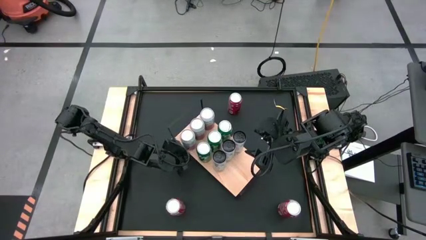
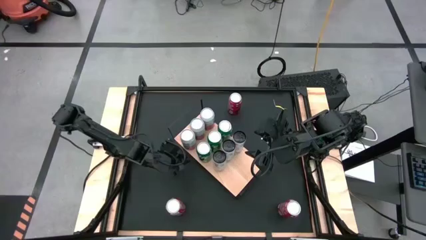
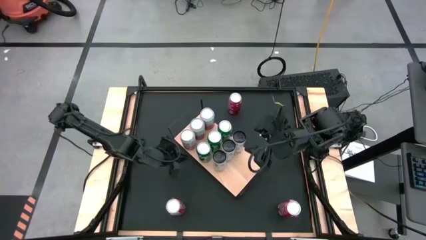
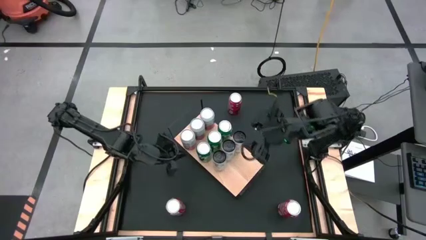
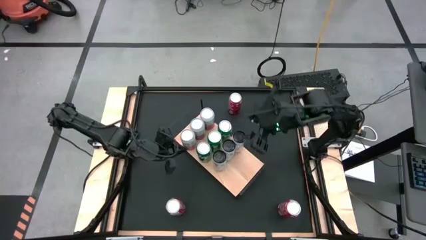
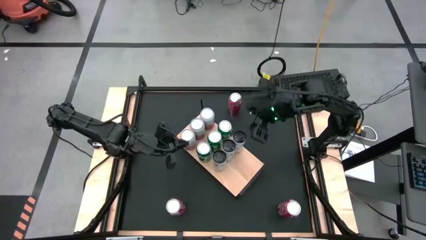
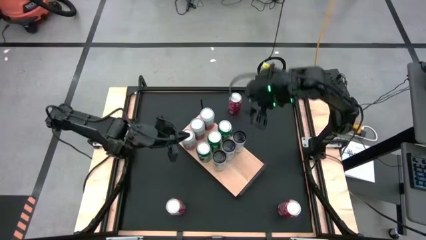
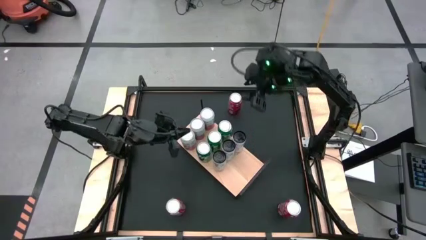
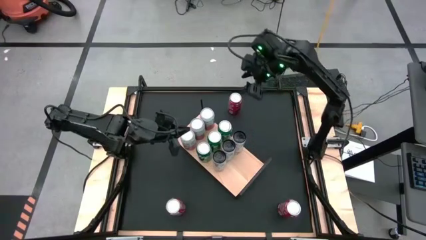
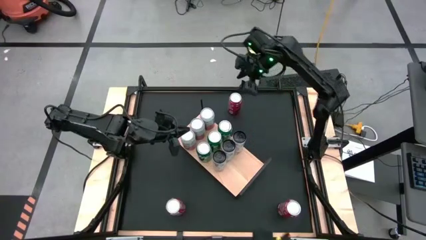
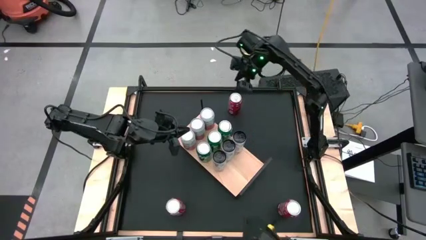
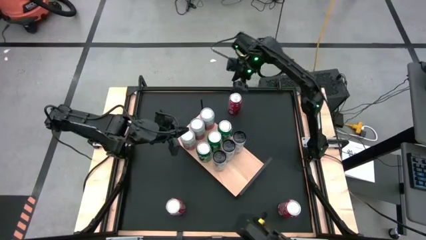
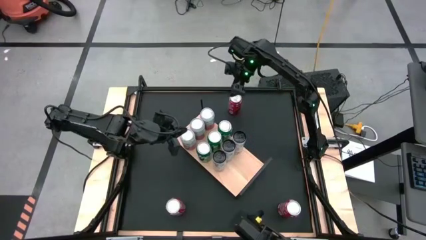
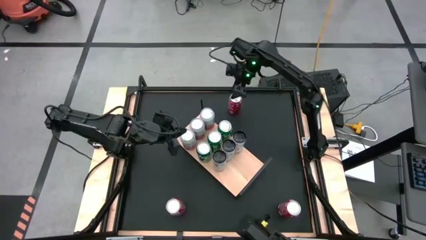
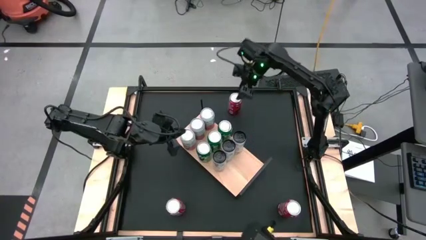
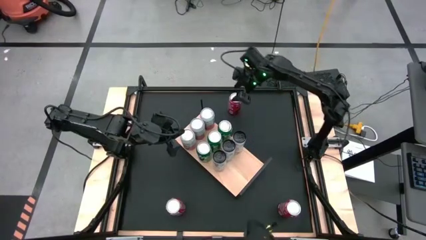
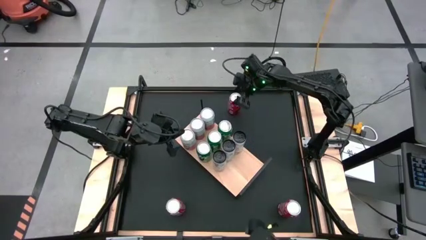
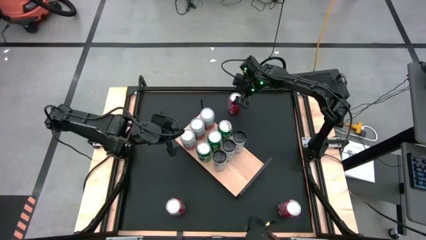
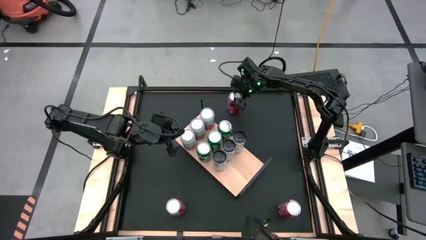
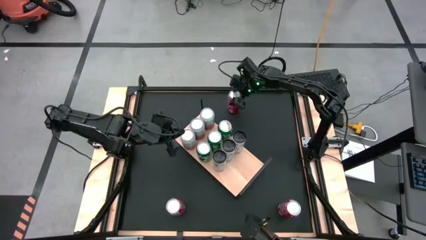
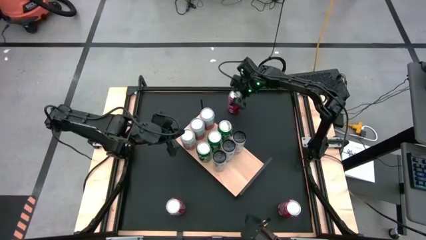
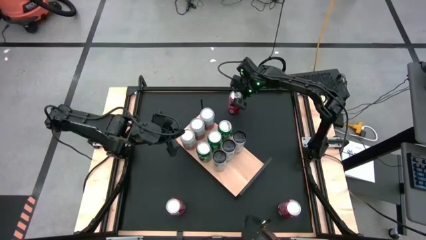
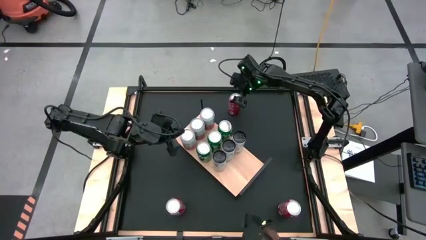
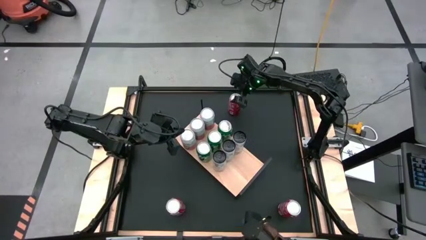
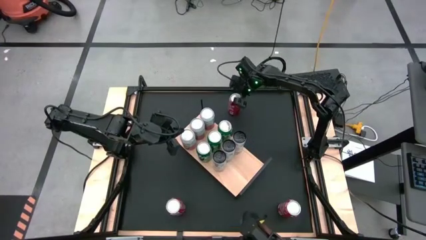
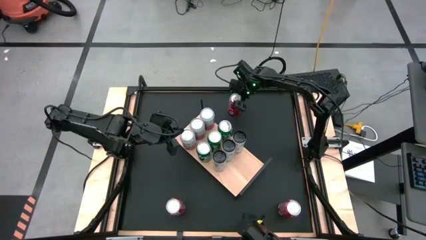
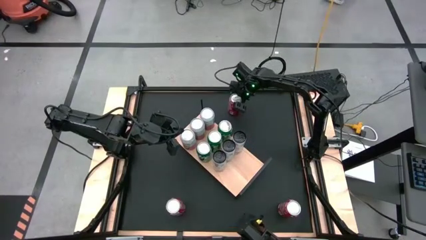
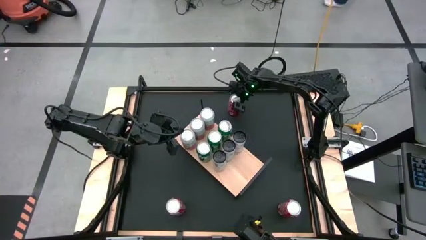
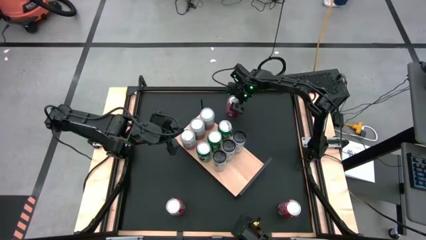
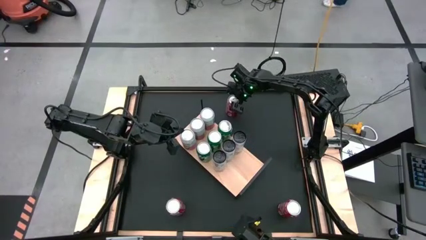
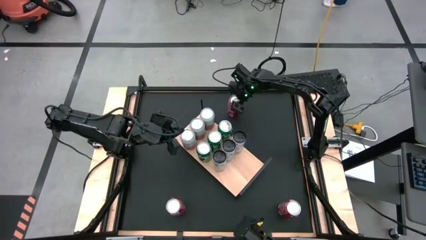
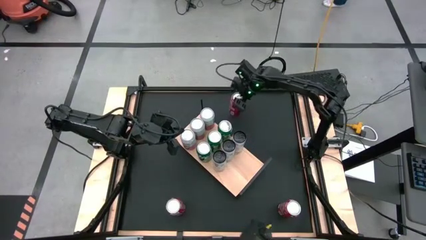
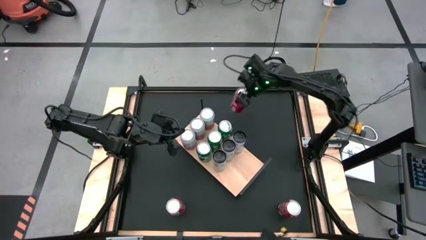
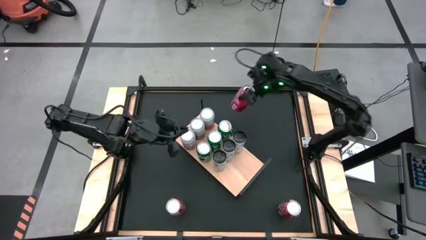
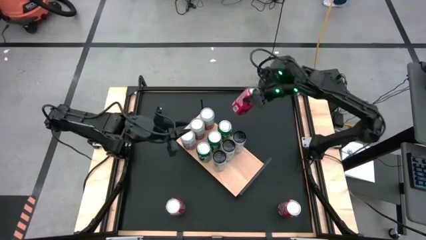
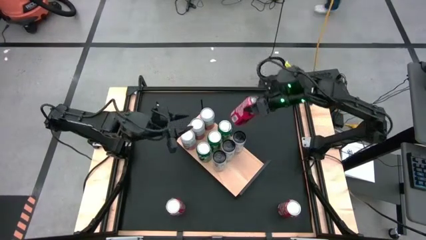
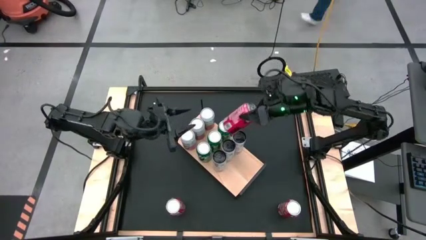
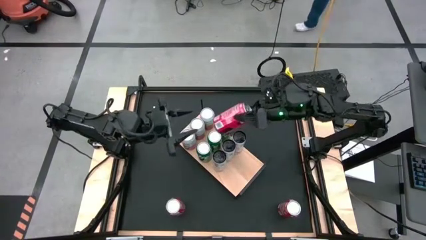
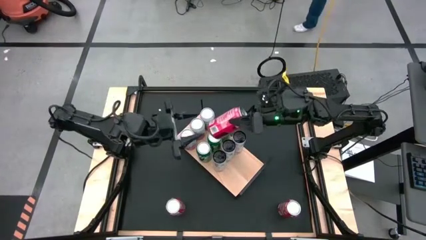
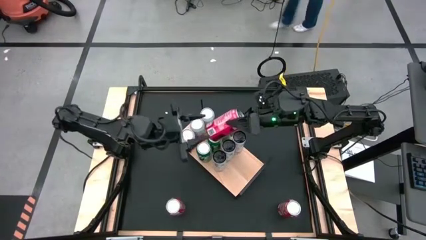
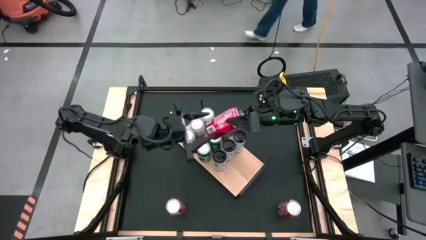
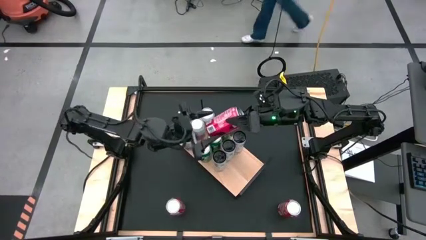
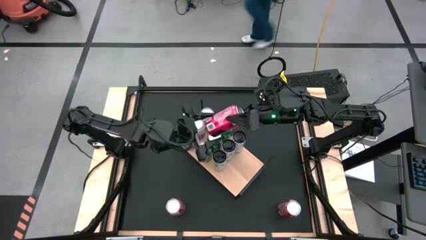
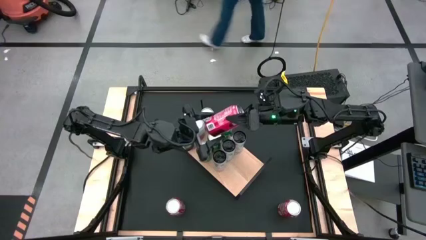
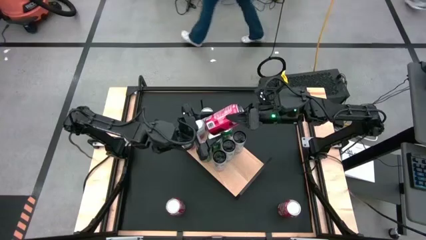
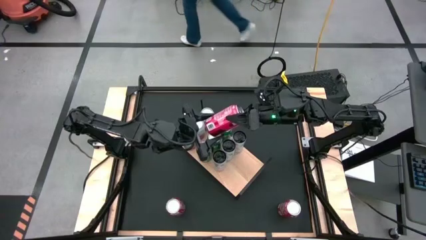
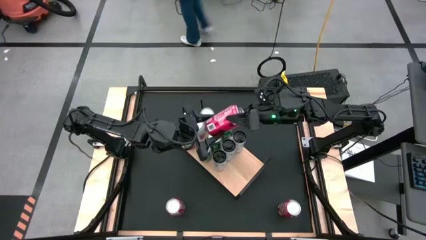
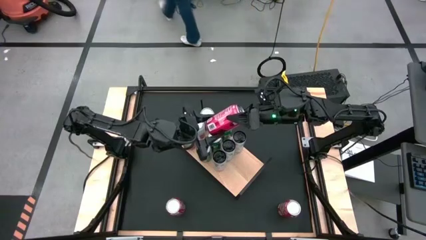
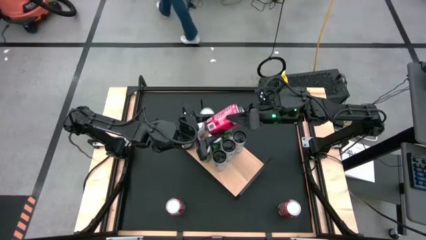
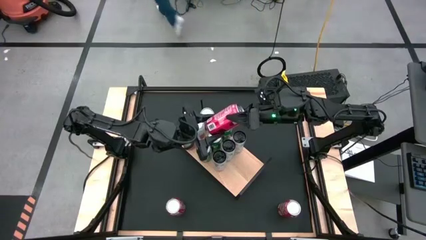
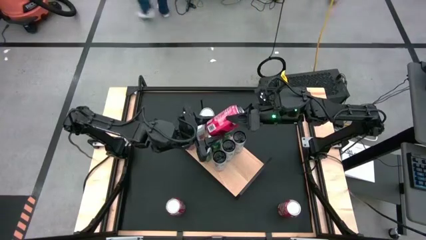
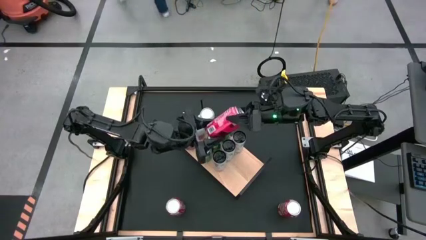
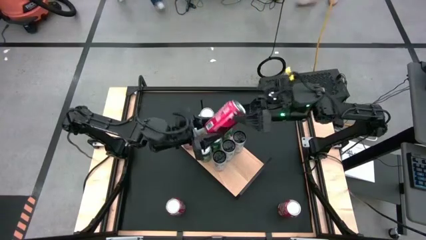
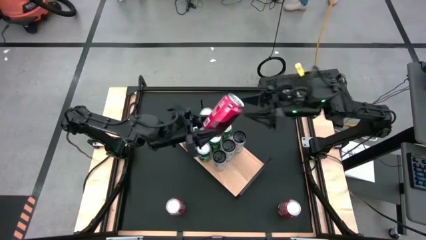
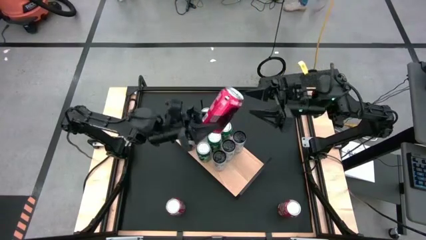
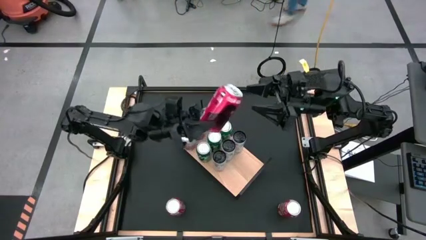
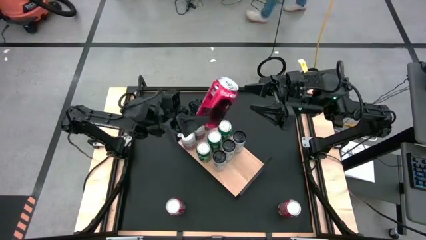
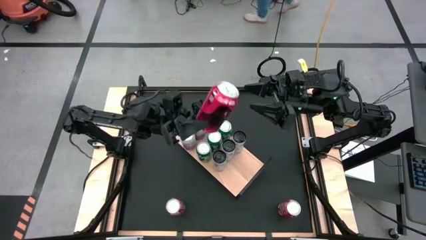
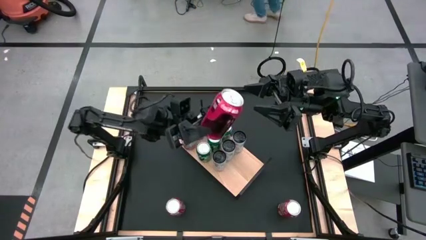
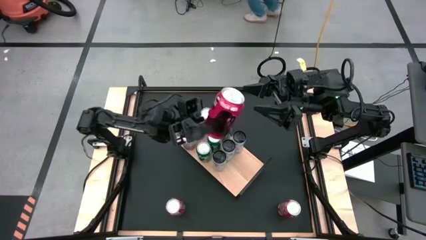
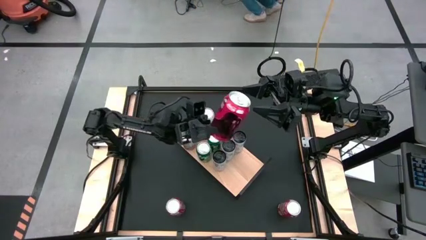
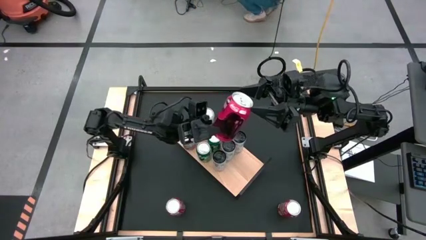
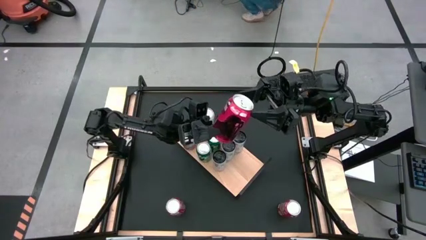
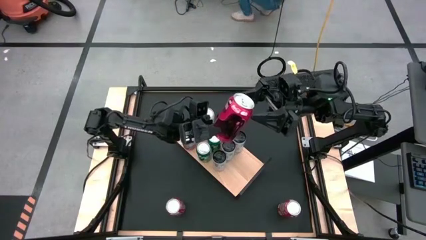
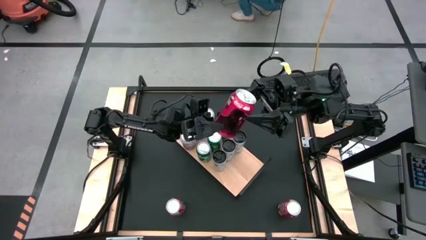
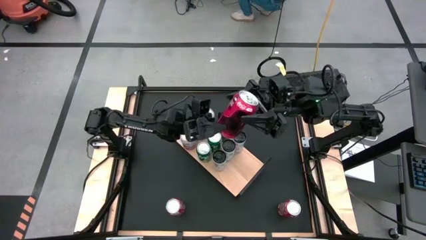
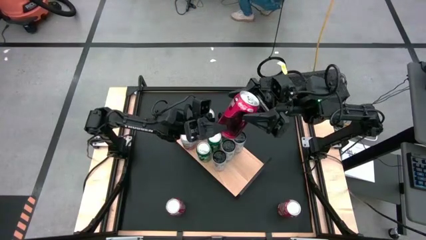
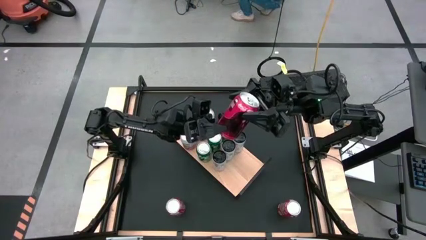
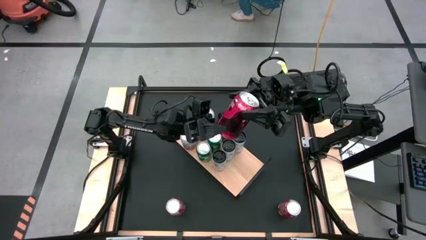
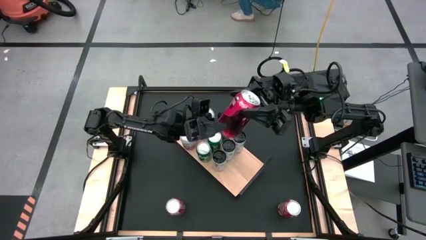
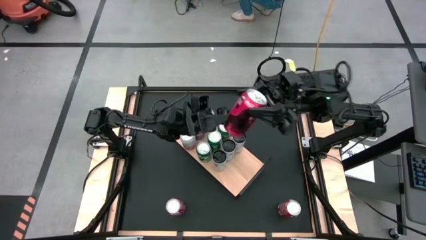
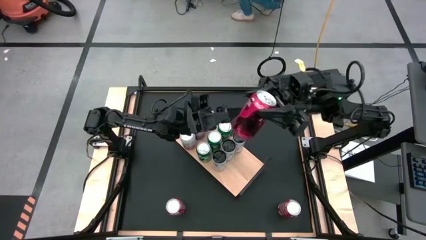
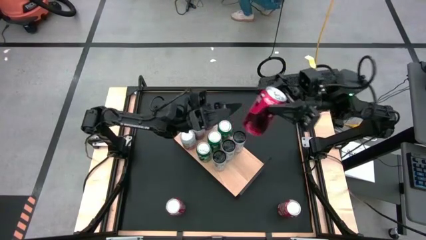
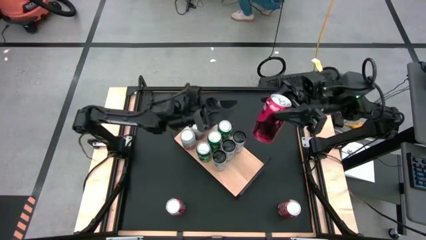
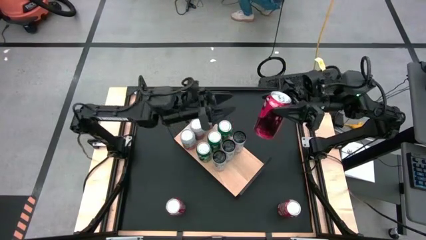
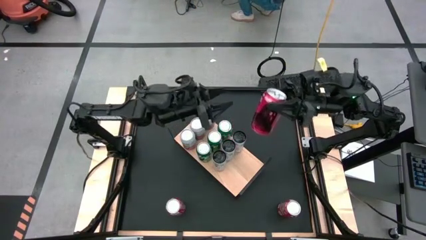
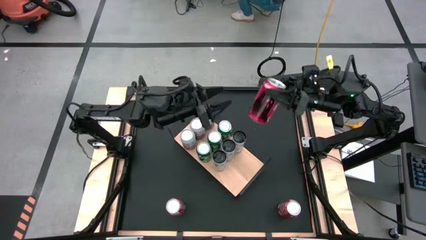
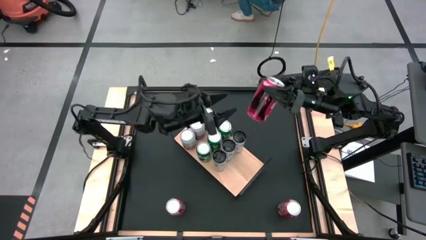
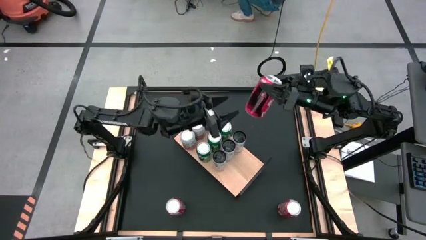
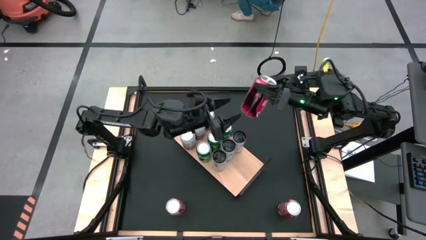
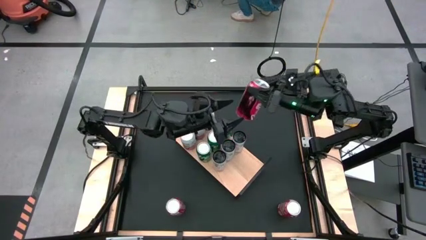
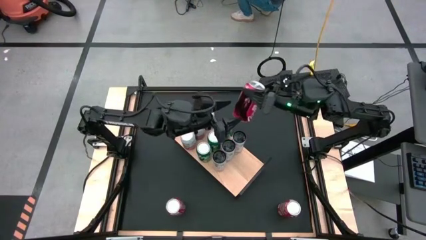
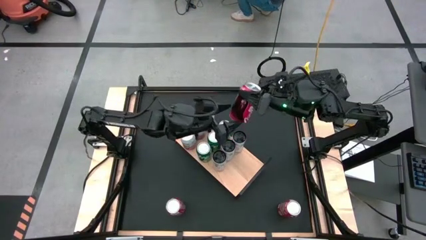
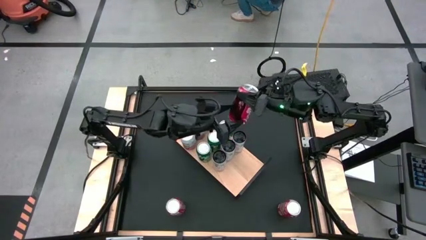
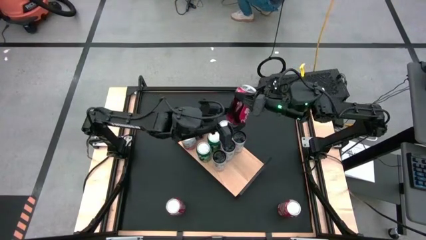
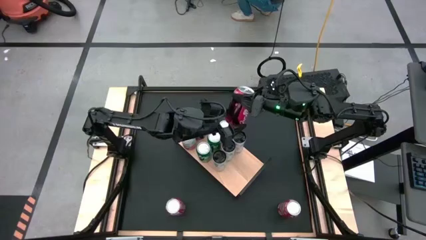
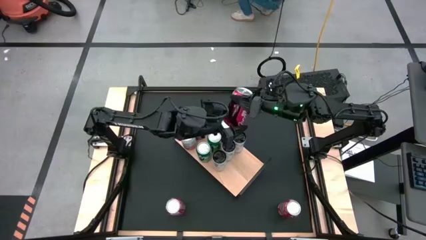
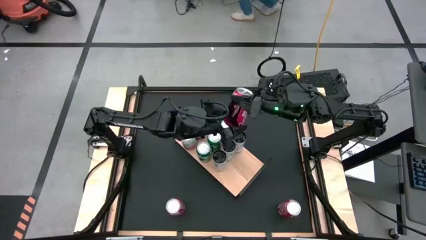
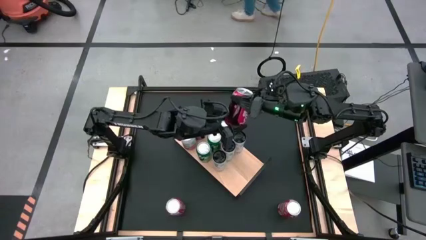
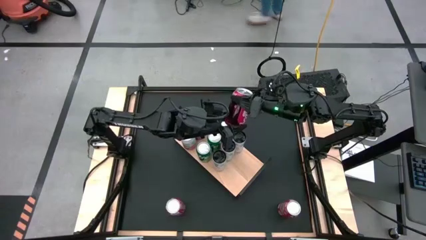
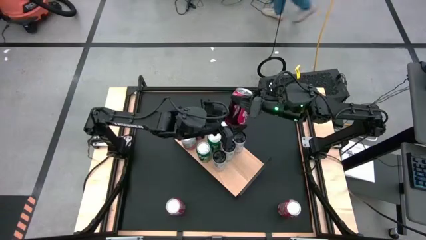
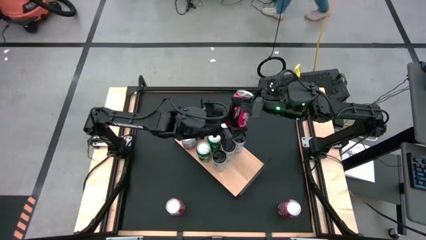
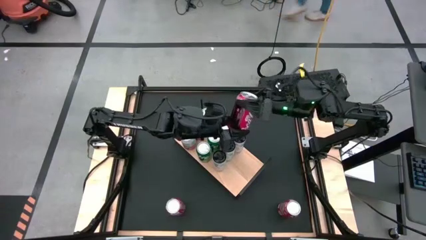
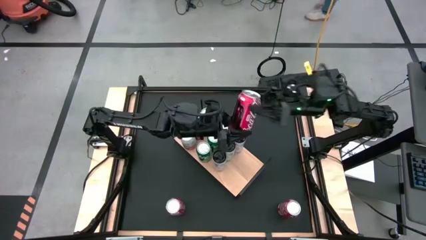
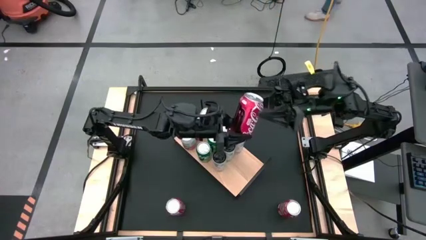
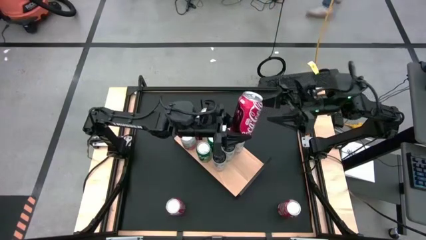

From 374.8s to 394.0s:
Task: Place canned beverage on shelf
Put the top red soda can on the shelf
